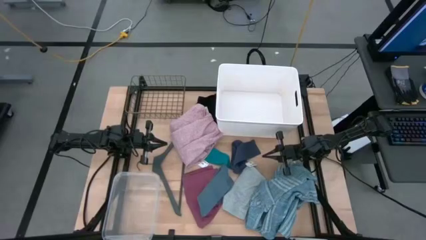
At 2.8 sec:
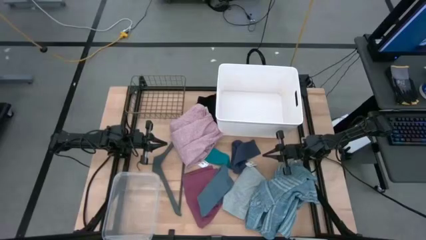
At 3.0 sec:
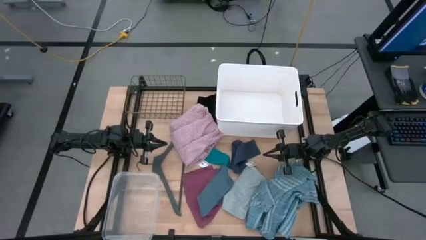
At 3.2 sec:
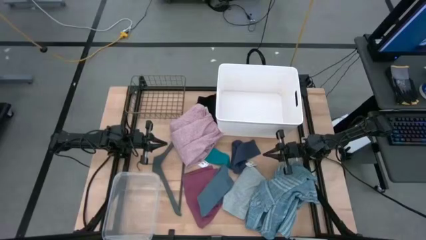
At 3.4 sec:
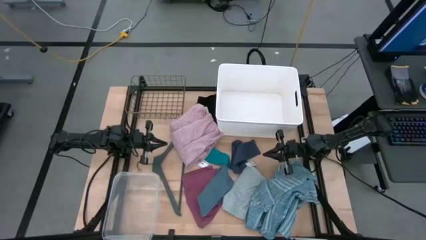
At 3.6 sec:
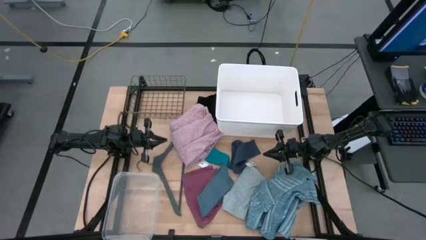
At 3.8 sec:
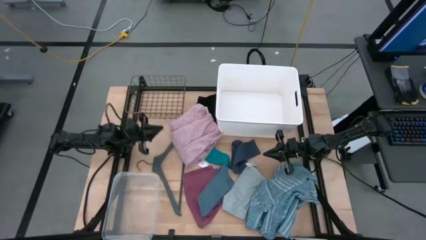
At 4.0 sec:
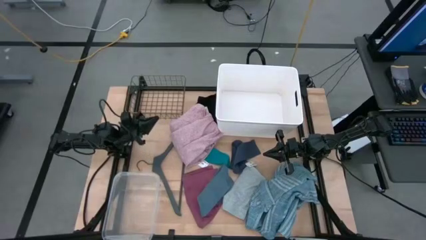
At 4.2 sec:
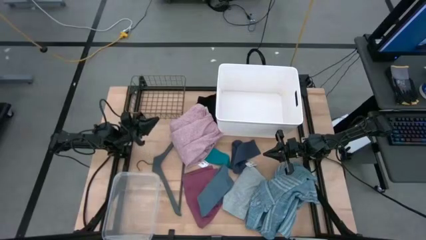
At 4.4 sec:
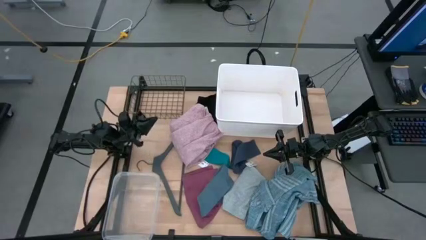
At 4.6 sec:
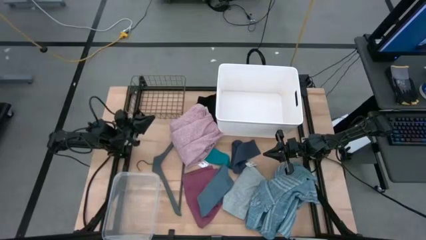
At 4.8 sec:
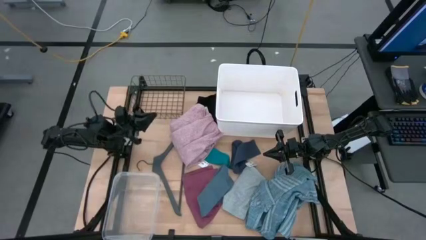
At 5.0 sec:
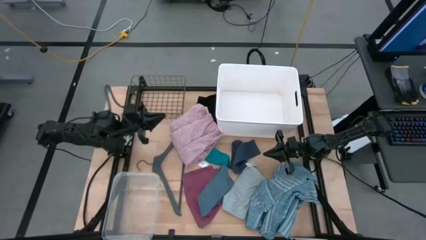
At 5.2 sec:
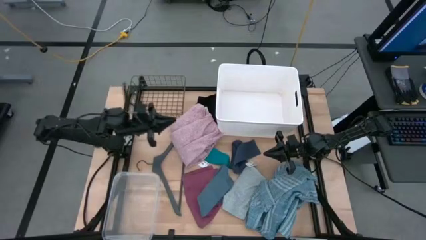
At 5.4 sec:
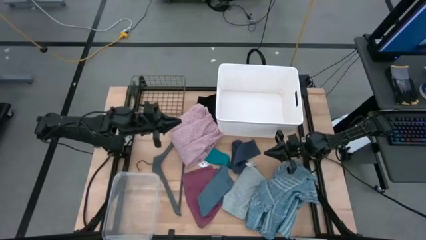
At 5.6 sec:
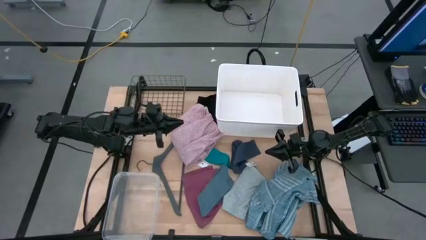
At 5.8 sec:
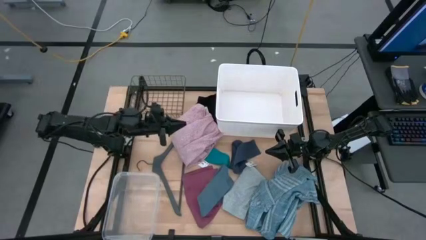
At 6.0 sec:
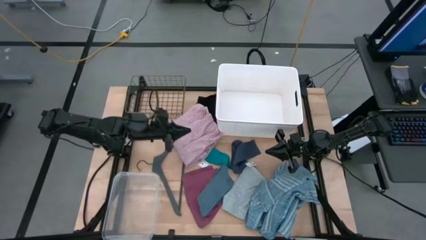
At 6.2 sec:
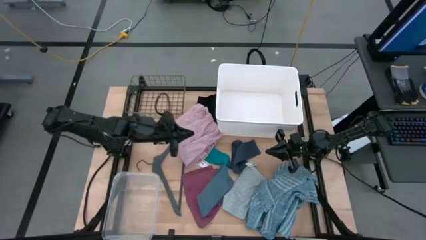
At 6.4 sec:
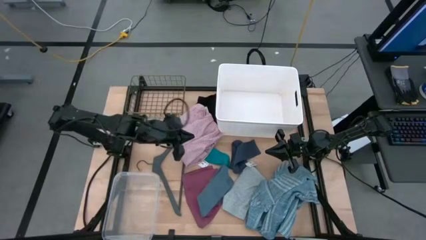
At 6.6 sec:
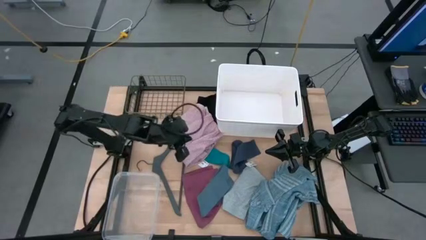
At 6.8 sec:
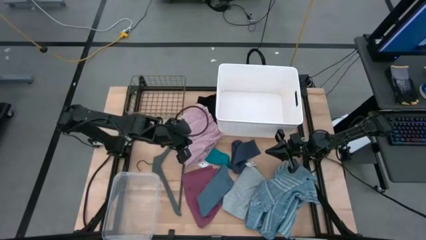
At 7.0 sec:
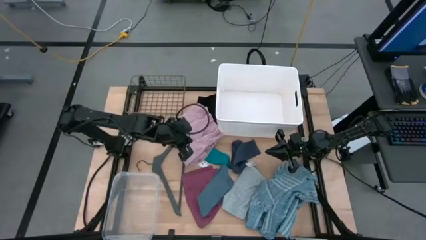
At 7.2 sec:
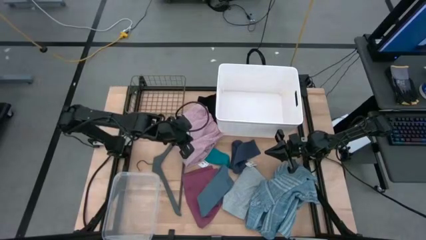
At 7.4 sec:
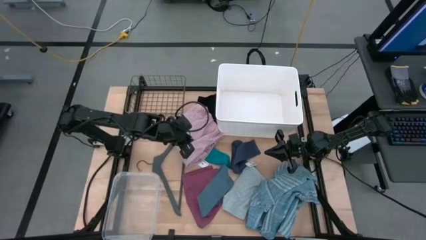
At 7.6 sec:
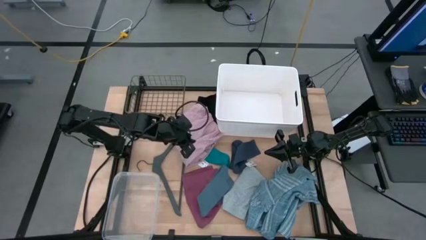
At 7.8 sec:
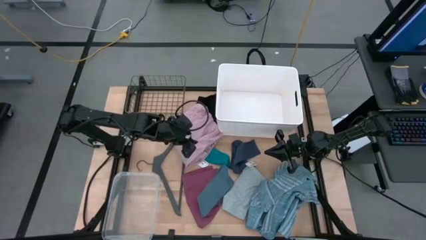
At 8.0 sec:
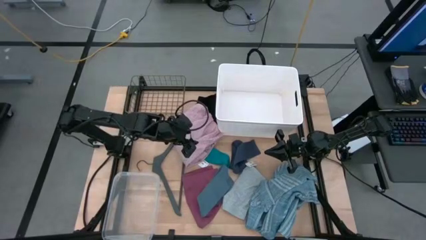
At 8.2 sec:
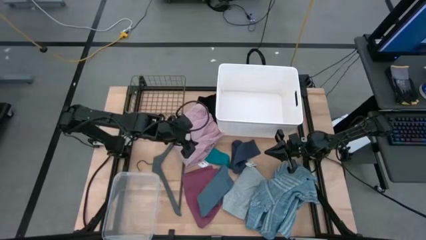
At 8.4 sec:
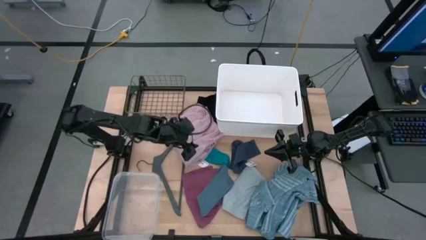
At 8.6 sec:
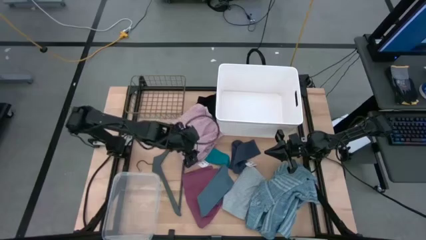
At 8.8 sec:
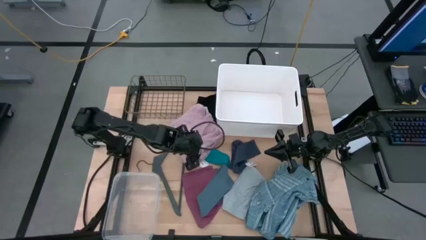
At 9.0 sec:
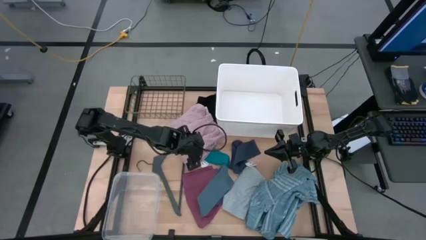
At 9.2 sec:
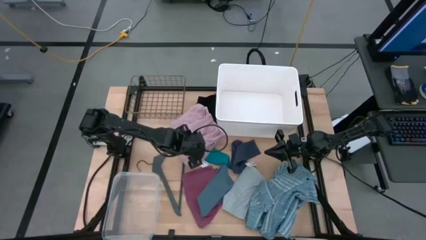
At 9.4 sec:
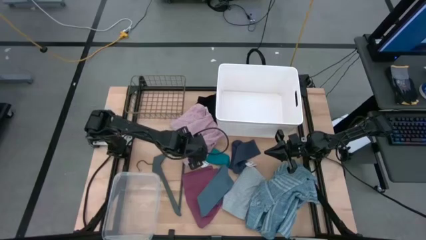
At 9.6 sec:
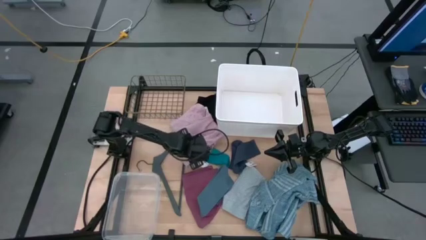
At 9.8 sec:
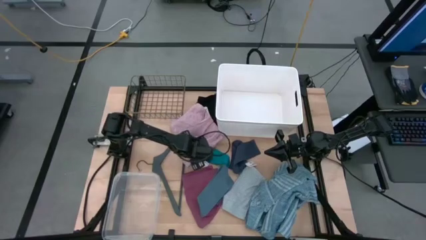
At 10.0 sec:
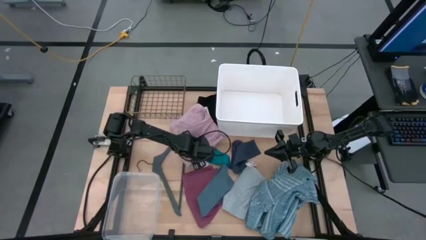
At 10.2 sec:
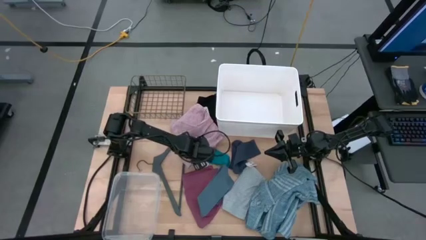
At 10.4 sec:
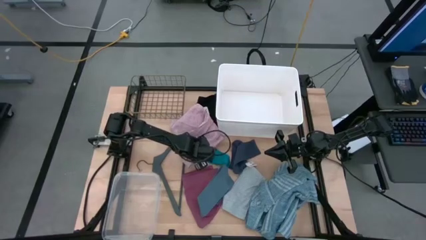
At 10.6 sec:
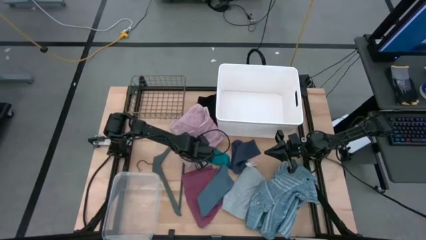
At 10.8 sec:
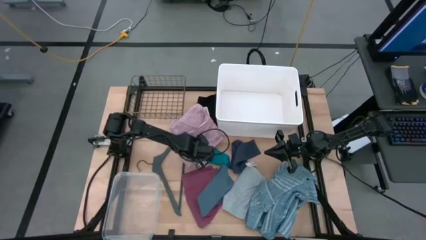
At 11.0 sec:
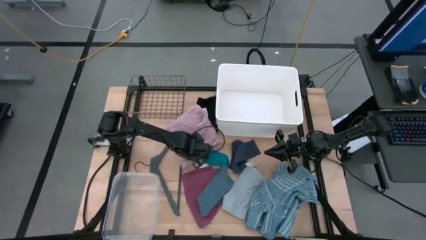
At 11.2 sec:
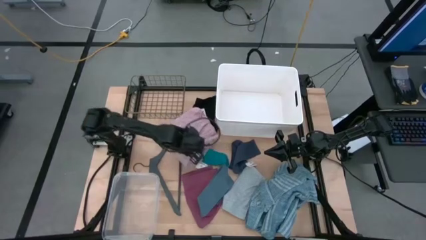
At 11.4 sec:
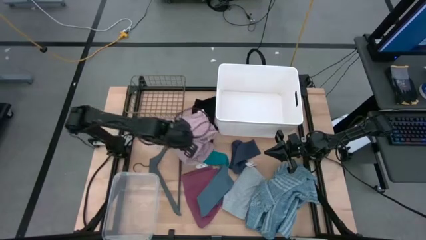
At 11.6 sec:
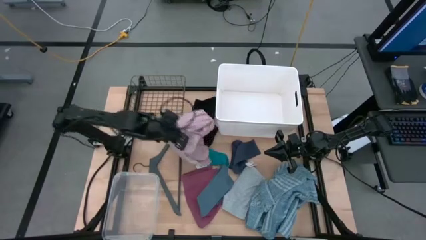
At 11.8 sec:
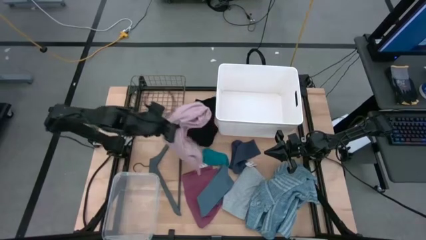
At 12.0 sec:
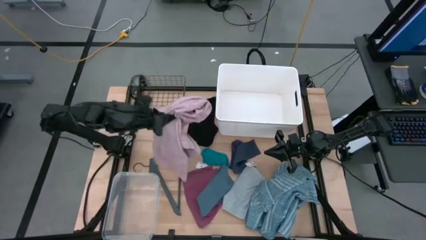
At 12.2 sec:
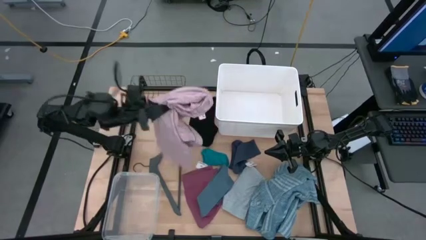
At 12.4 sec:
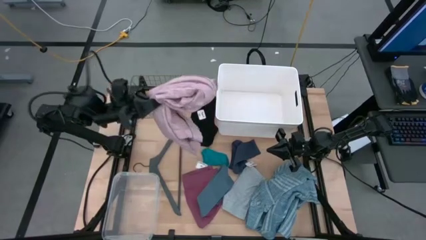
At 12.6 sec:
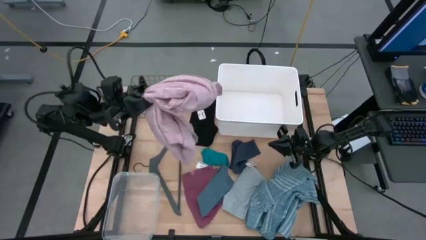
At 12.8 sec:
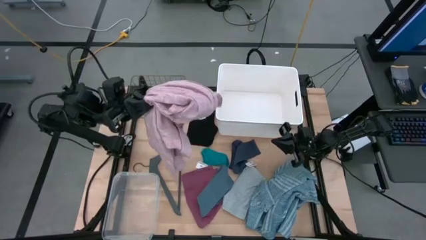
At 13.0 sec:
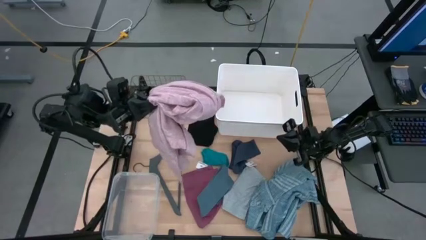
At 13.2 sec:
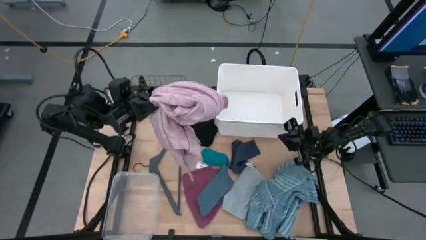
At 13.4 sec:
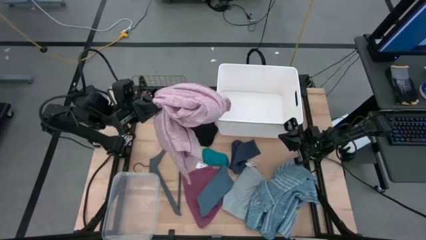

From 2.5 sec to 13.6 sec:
Task: Pick & Place Cloths
Put the pink long sleeve in the white bin
